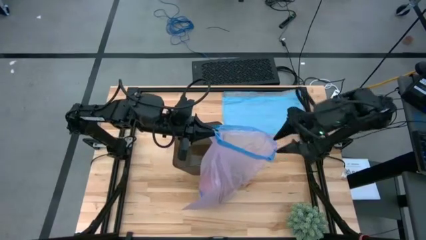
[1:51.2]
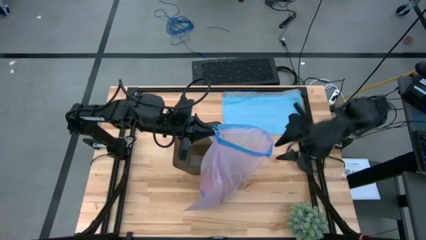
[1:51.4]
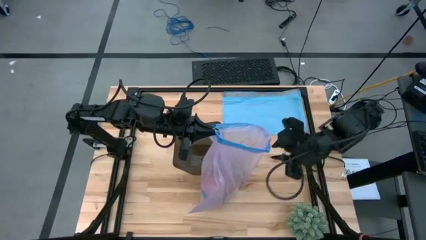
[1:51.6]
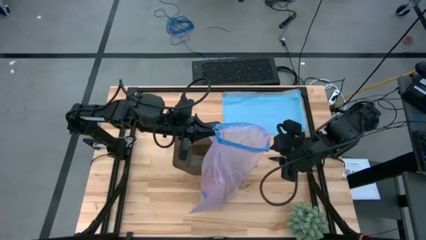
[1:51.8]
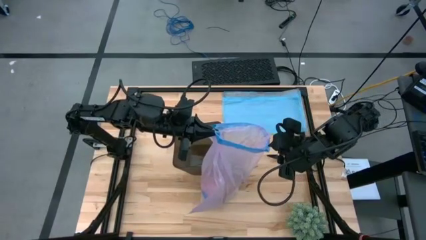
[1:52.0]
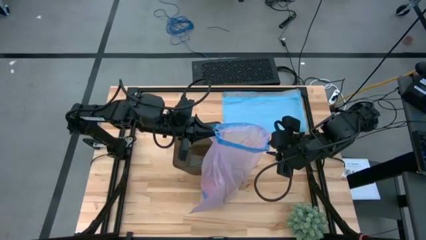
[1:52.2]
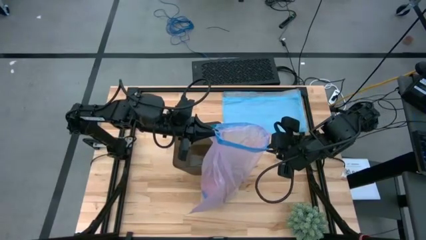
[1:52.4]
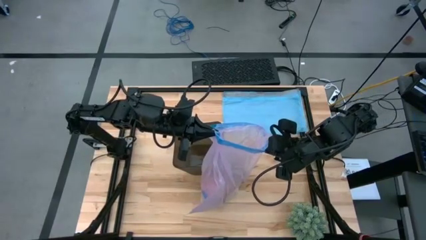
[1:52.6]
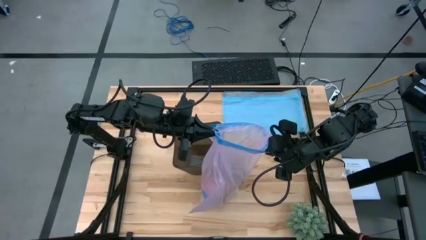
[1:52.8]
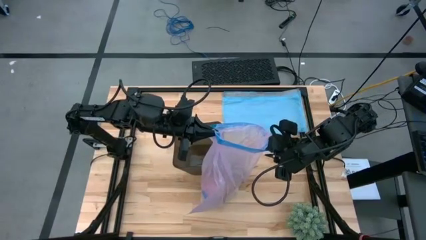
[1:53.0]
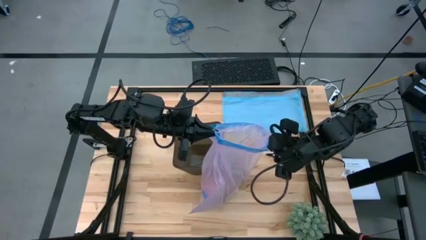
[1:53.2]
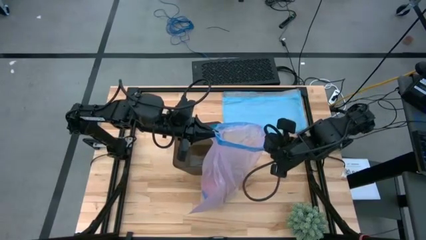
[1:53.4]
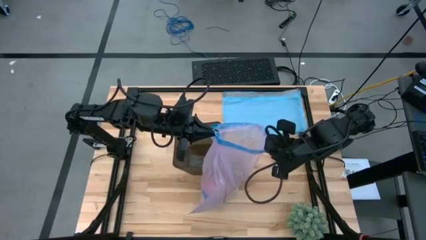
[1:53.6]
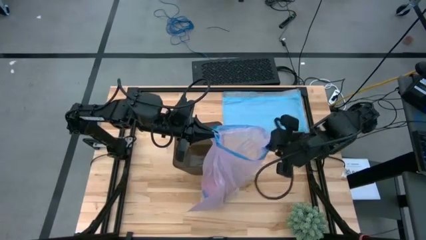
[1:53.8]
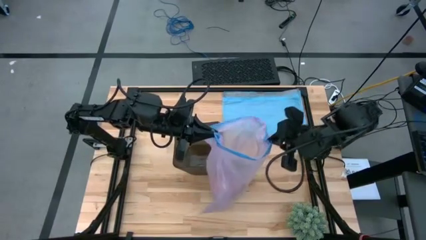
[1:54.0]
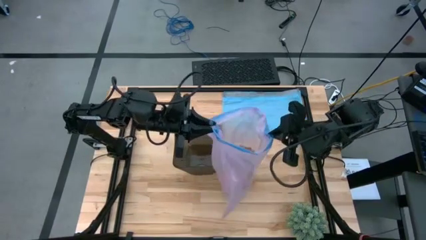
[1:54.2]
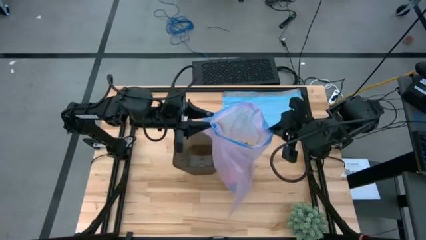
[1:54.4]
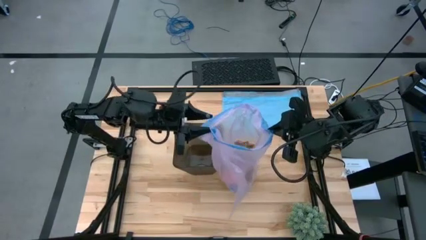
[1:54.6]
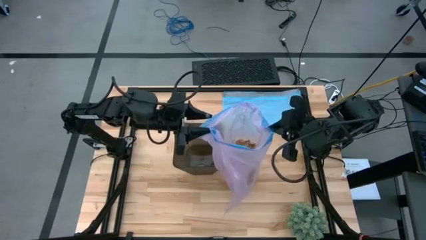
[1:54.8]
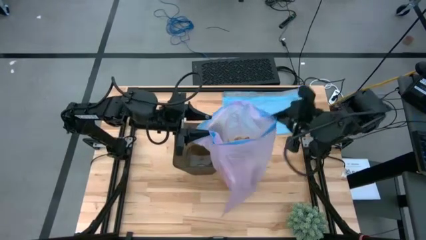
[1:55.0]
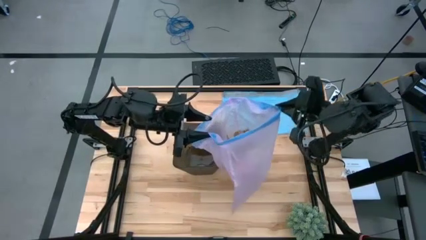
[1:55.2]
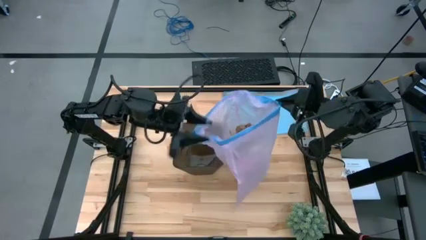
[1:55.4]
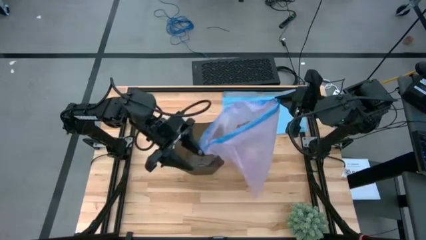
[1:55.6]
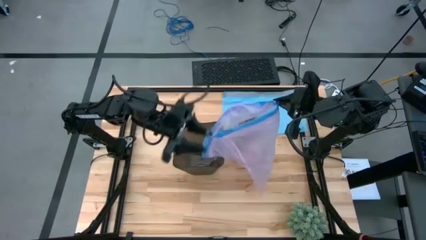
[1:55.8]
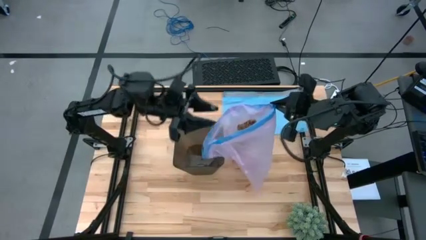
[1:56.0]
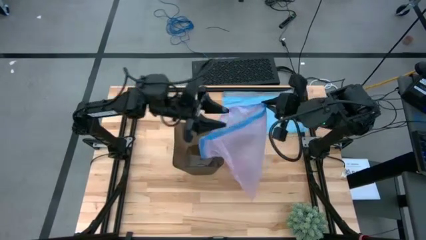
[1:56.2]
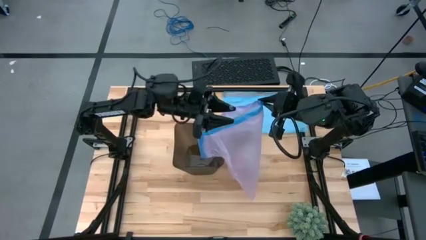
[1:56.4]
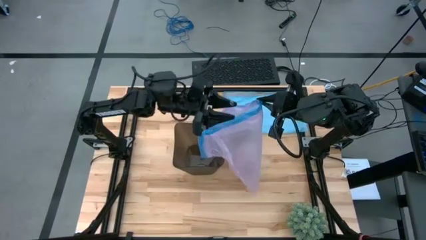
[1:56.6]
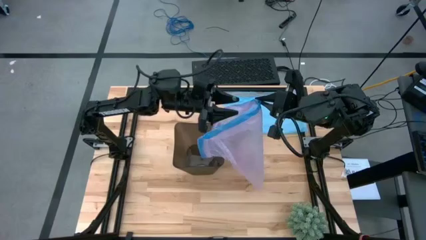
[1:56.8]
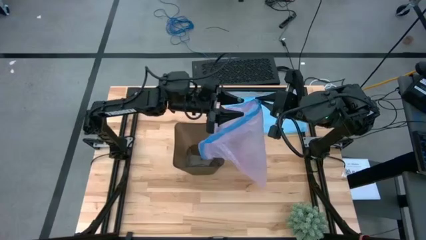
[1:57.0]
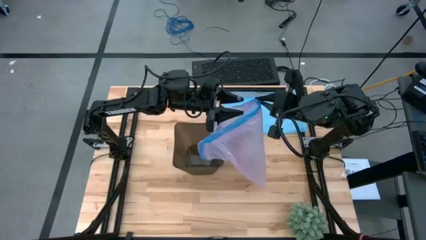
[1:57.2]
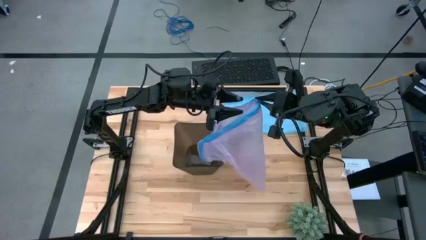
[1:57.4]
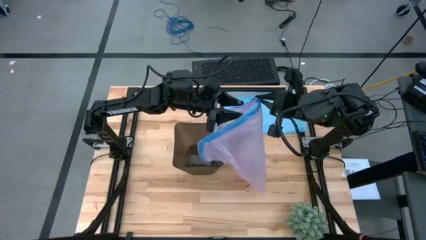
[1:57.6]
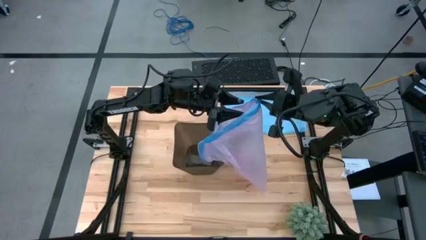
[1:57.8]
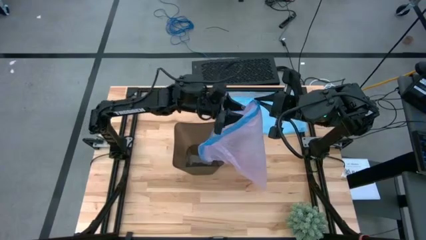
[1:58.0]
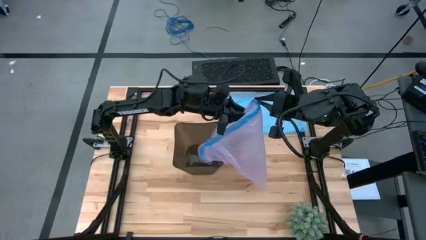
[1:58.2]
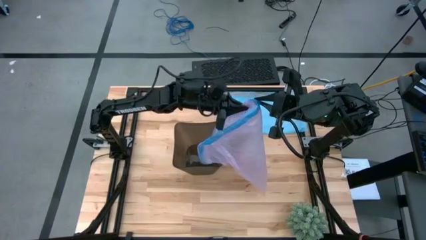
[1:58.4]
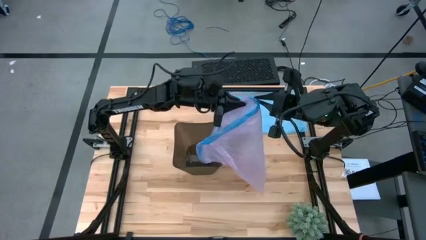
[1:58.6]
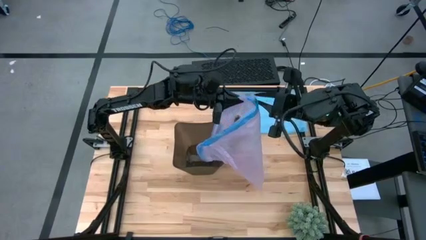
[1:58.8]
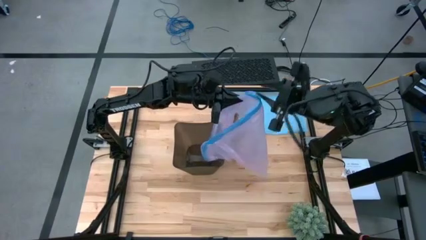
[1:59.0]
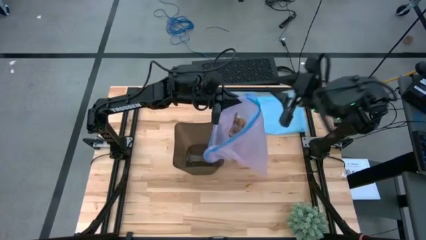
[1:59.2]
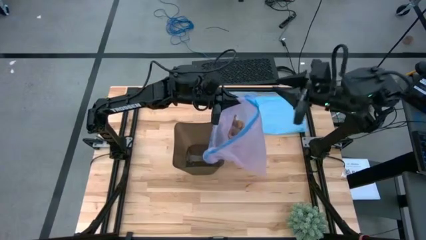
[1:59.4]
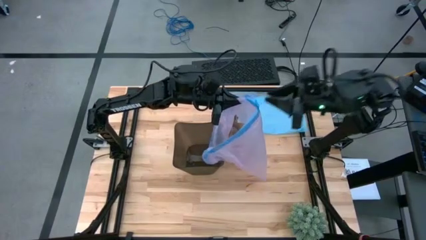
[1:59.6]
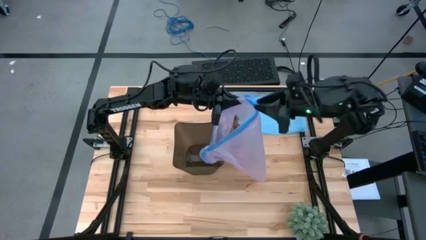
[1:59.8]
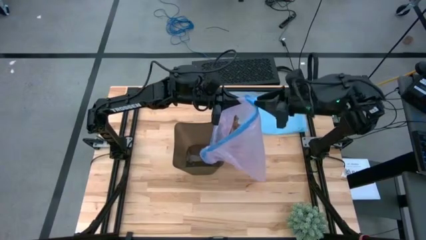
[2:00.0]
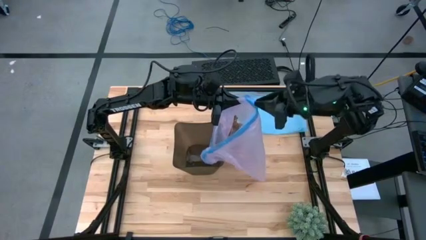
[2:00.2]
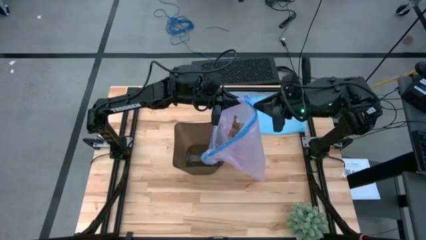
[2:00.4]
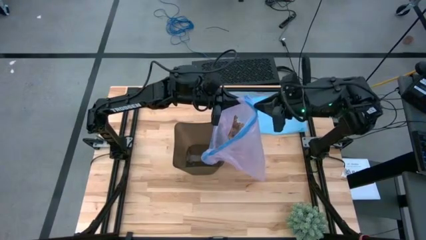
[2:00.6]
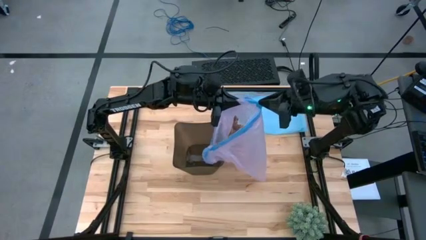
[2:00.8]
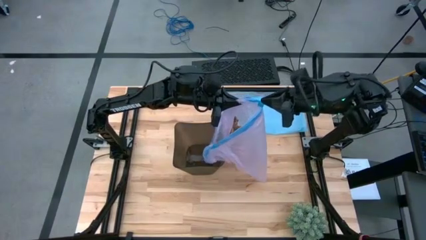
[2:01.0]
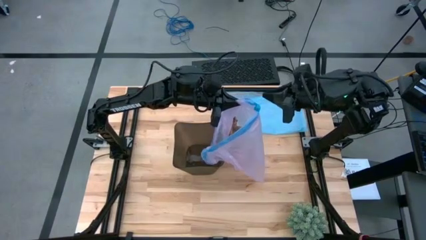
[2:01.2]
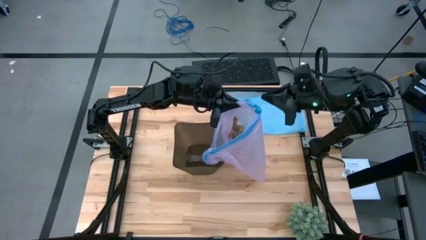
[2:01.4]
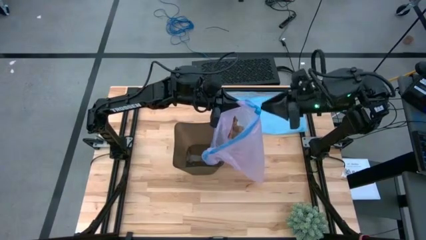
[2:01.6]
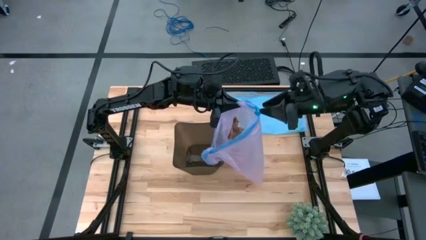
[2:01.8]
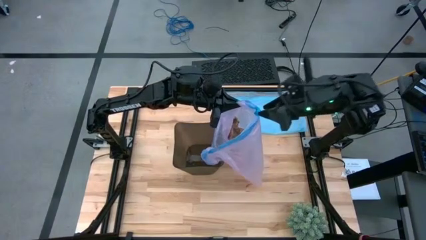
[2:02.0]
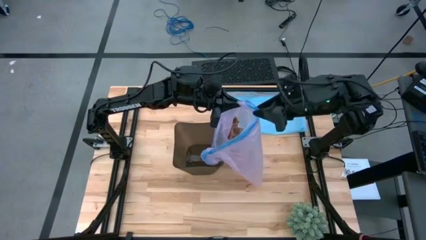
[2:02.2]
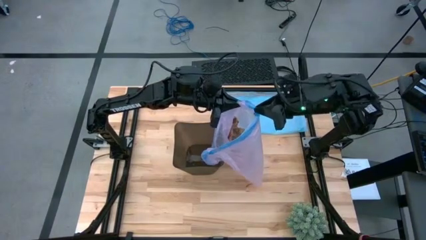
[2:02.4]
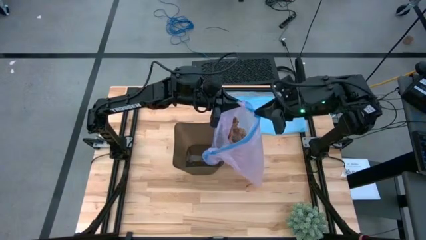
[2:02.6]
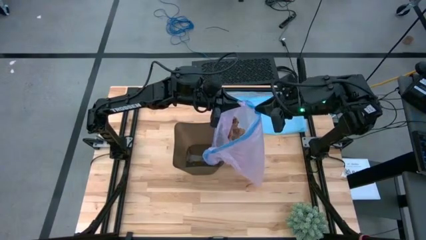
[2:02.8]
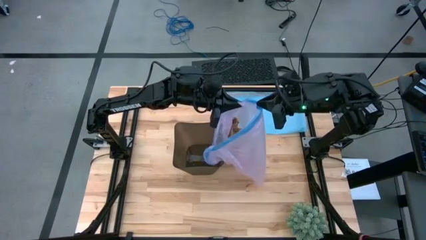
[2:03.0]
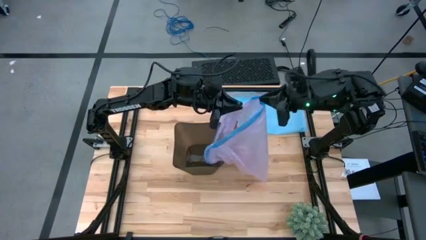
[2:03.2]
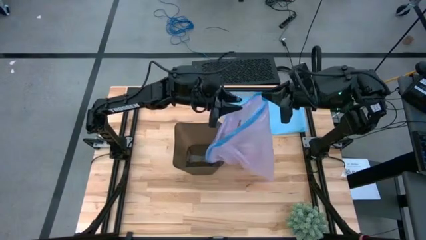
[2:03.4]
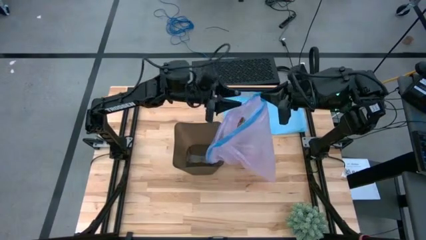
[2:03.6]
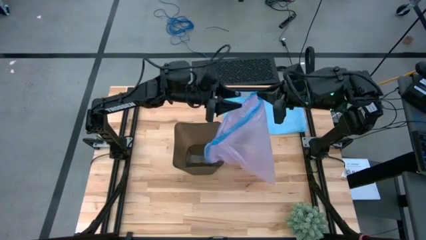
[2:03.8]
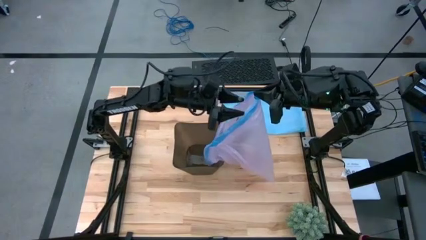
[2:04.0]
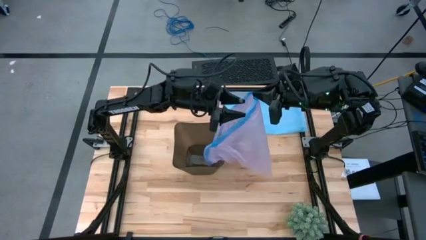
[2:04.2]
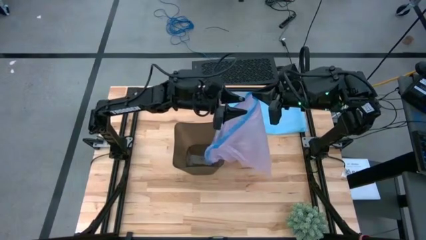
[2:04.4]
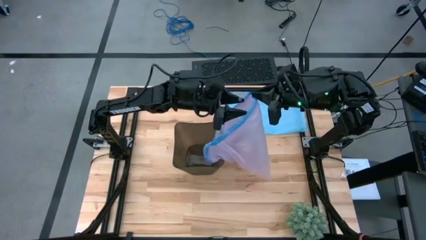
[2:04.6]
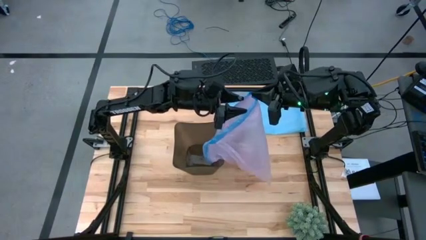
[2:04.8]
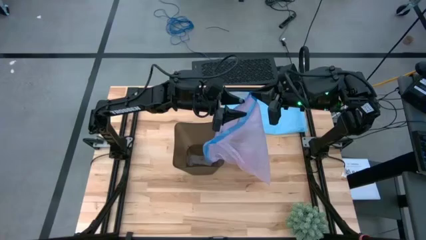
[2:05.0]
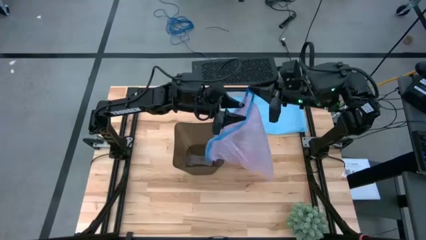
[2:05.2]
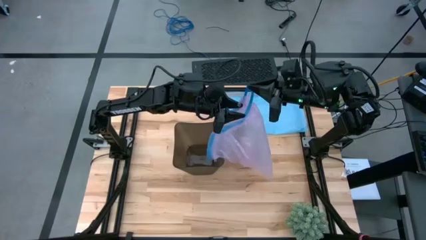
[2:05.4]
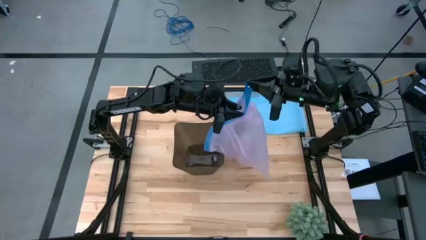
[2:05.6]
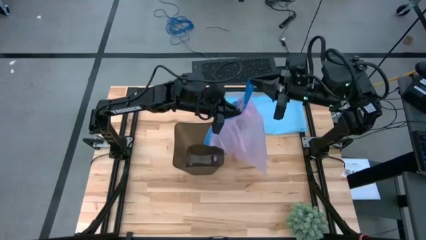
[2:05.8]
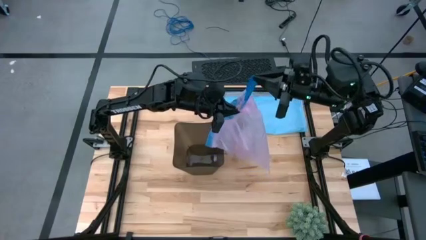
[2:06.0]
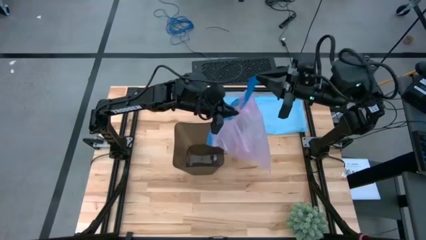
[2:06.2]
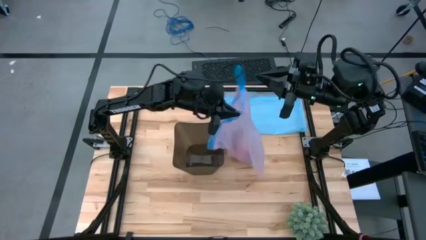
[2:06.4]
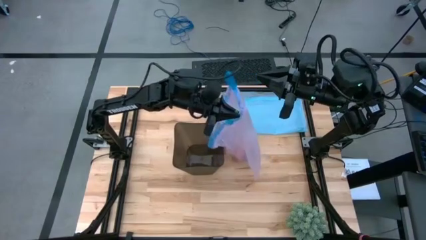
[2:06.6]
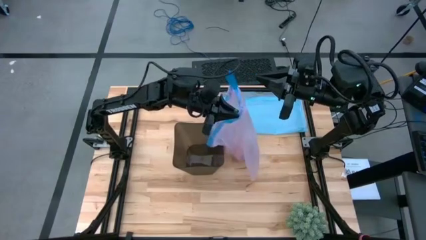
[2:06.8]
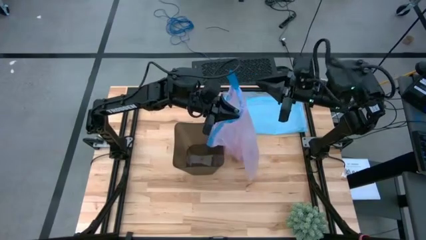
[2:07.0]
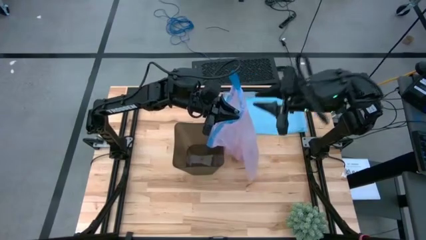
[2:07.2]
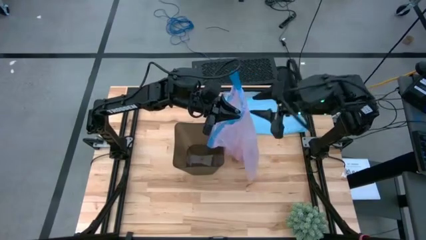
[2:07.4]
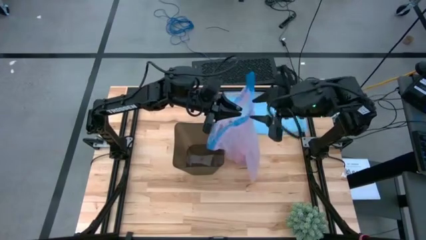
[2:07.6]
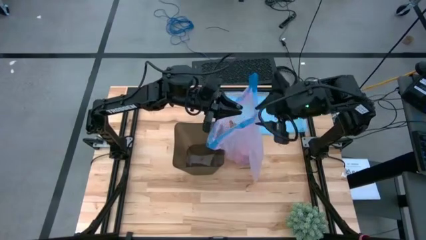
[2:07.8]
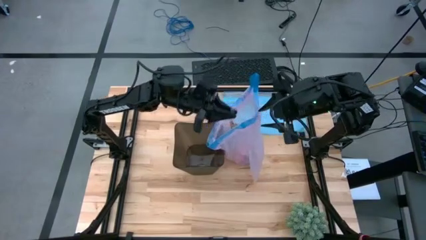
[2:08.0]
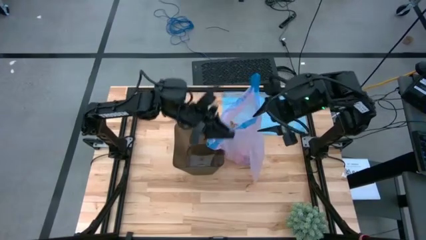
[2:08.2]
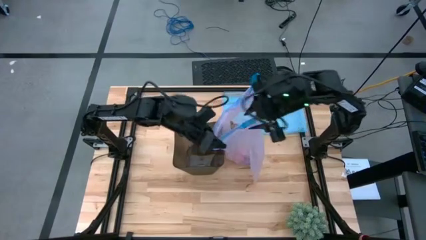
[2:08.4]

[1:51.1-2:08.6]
Task: place trash/remove bag and relplace
Close the trash bag
